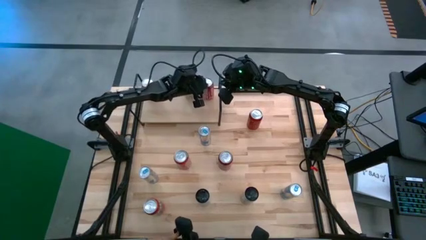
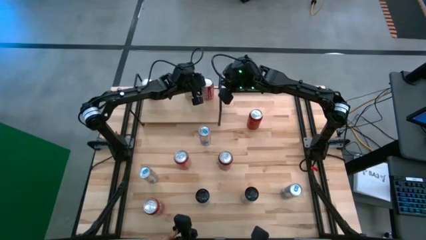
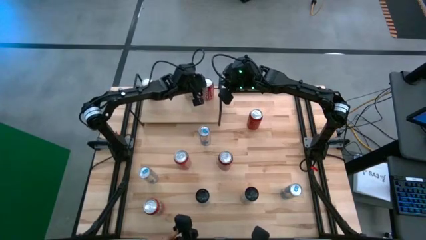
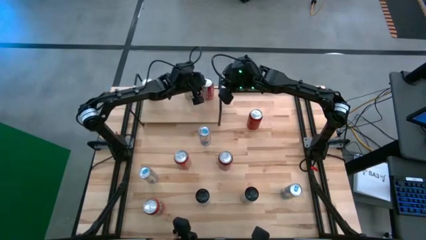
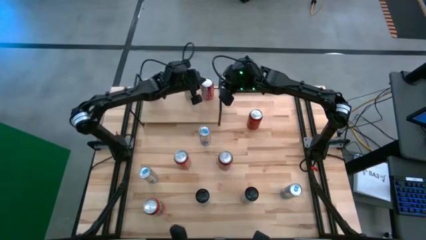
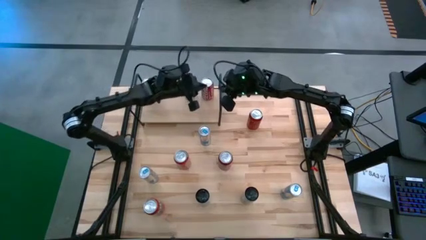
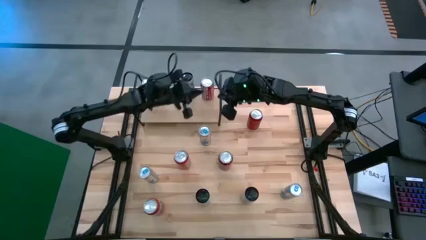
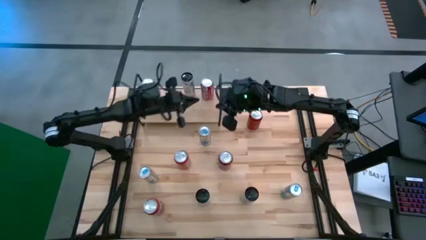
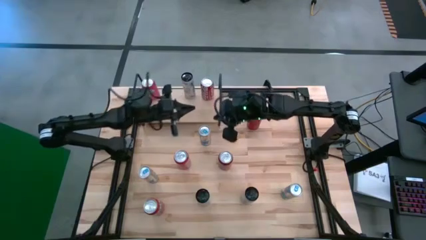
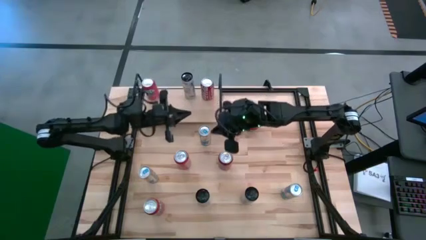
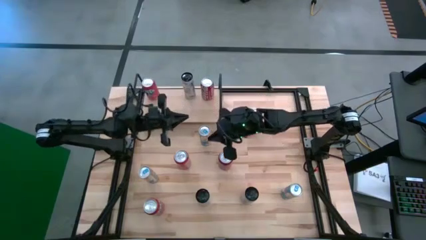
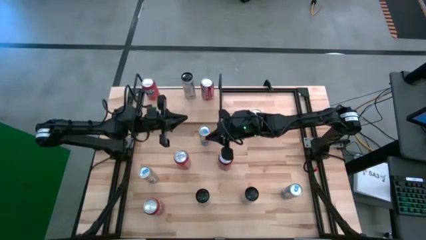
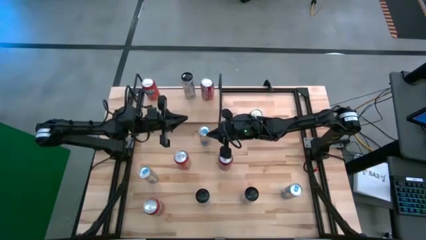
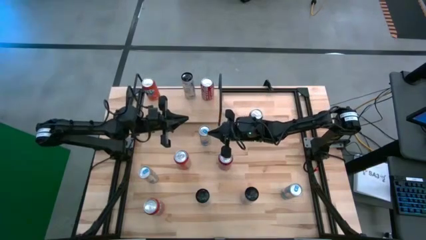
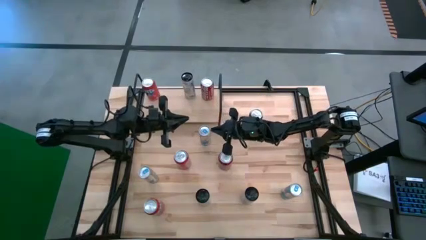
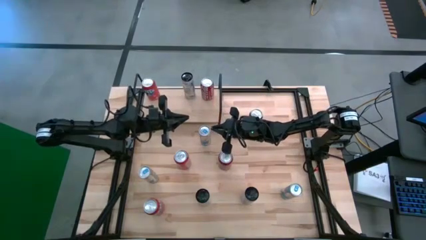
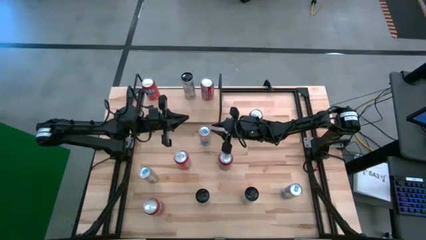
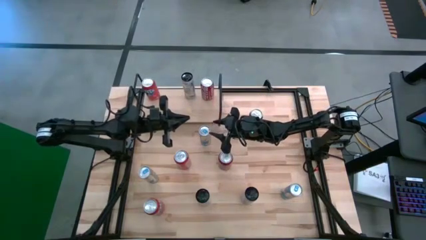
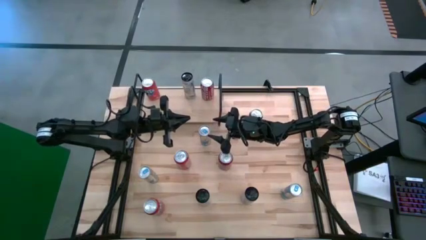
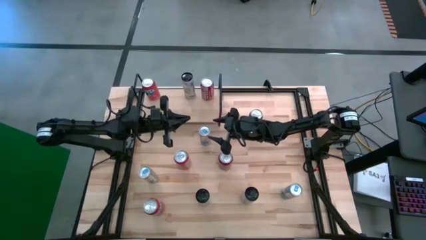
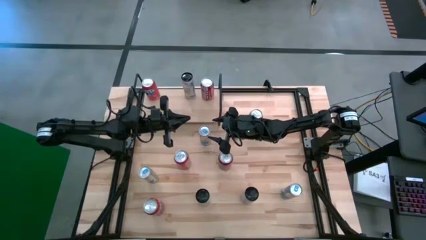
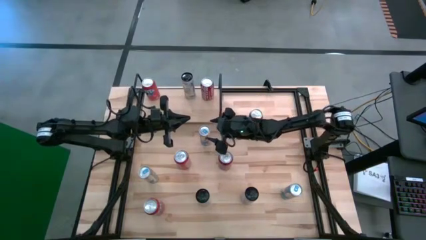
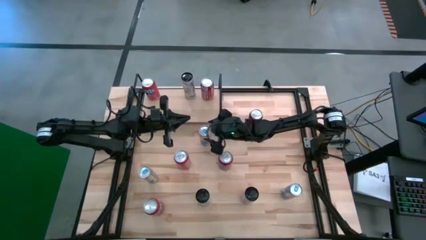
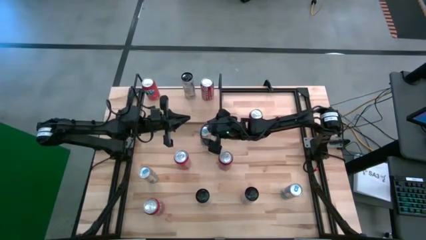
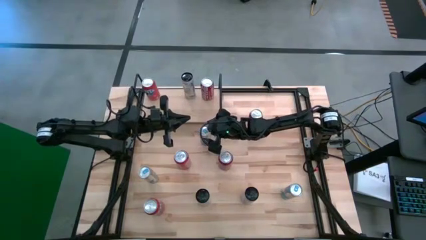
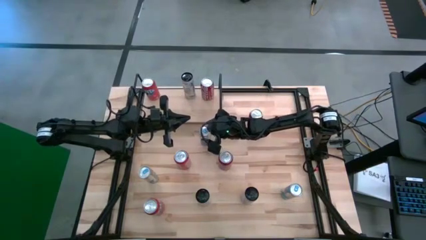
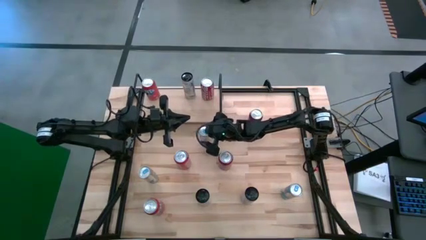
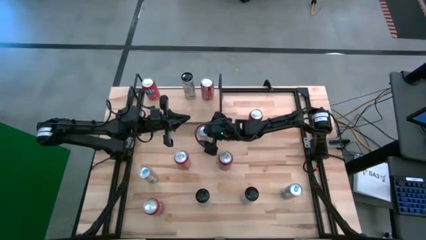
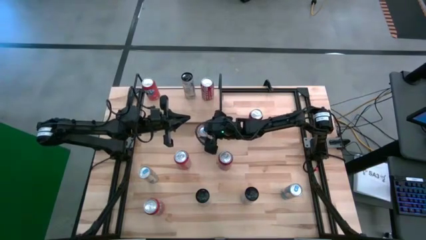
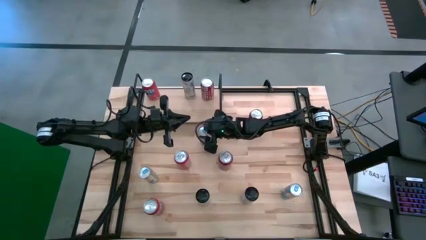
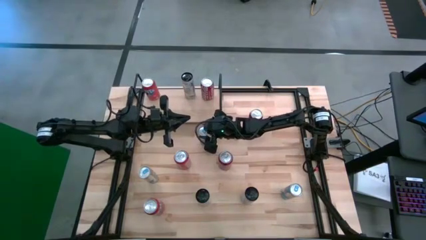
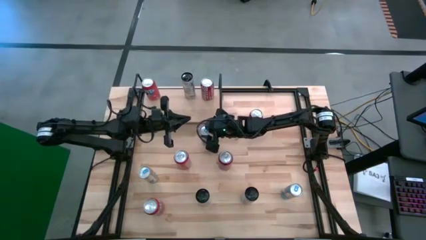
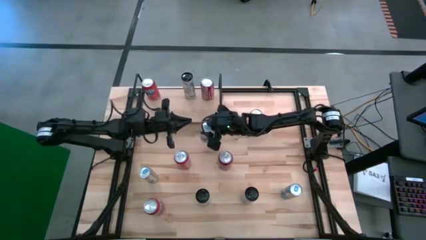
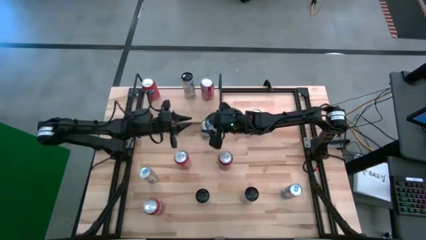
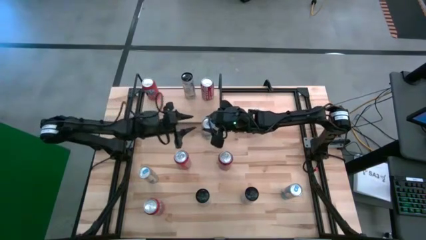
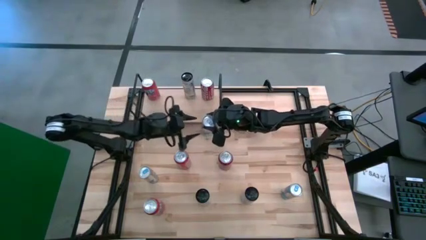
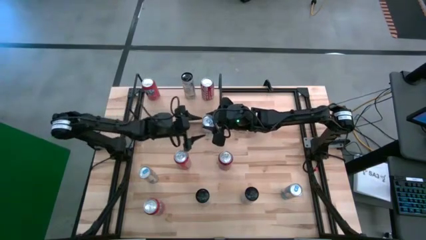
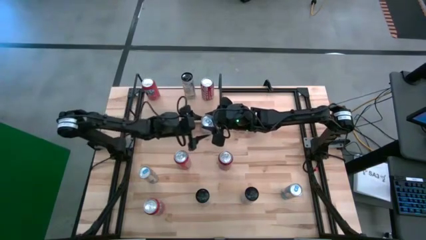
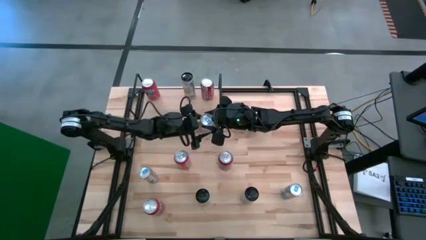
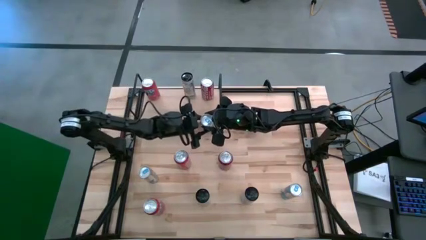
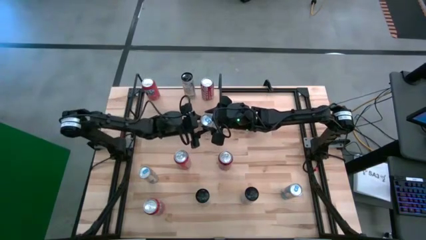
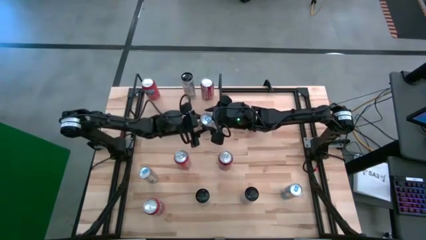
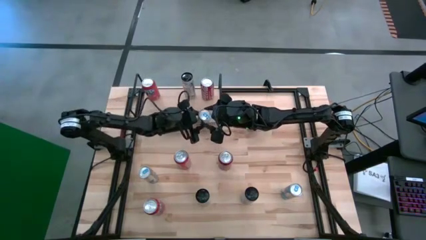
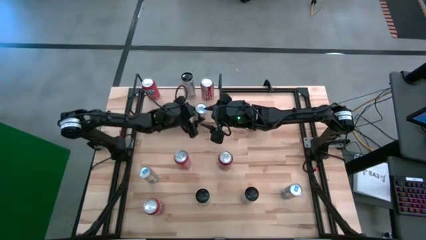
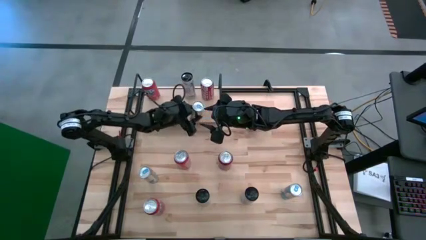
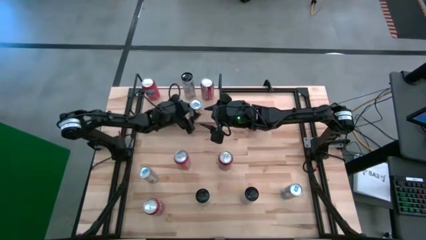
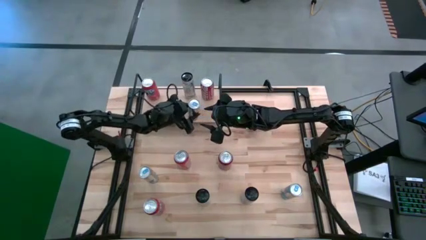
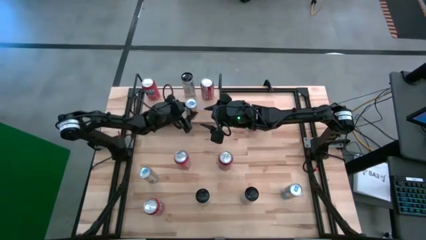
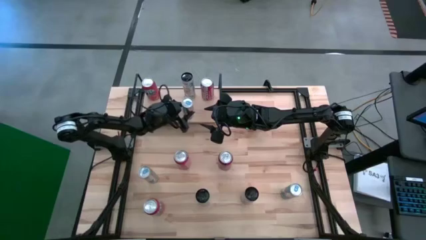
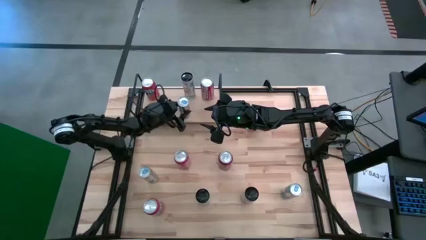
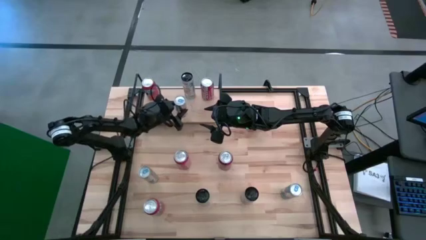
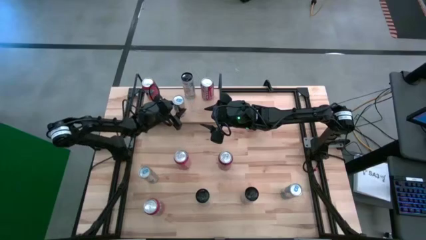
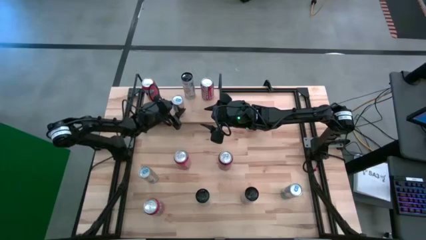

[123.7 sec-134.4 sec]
Task: Place canned beverage on shelf
Put the top blue soda can on the shelf

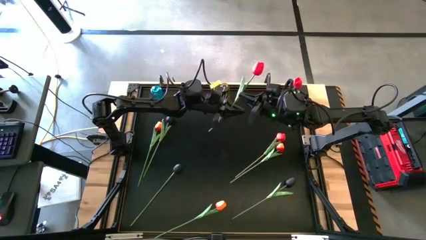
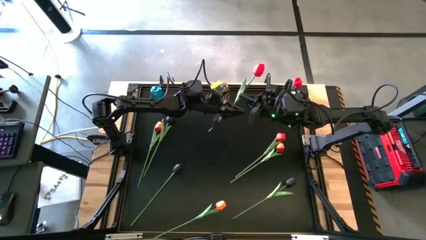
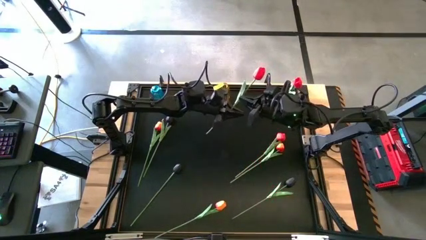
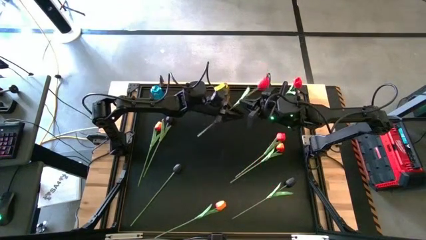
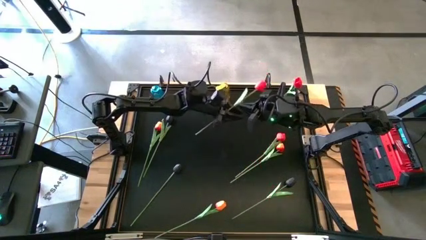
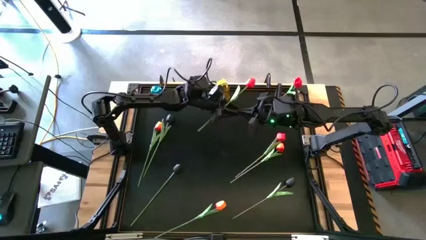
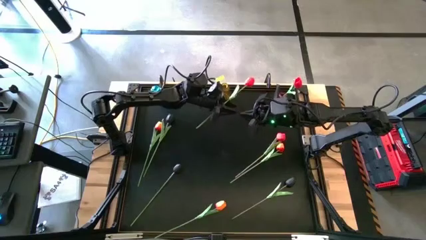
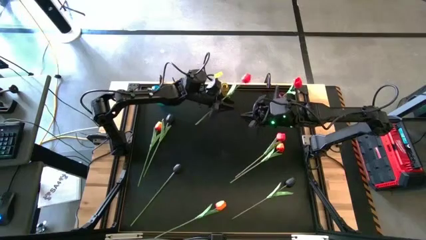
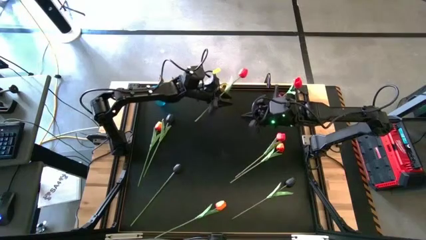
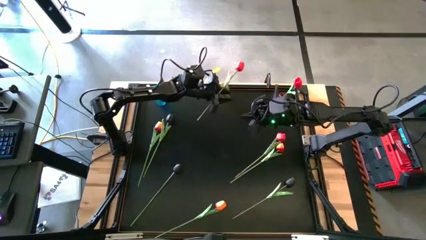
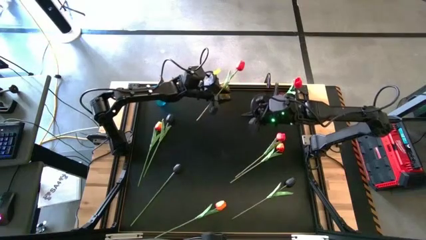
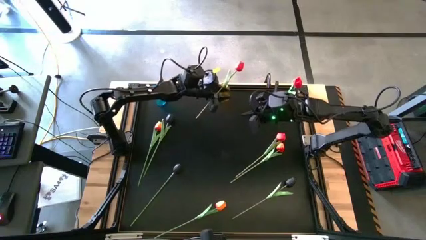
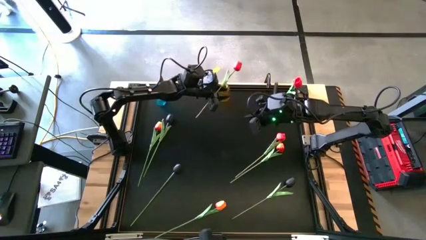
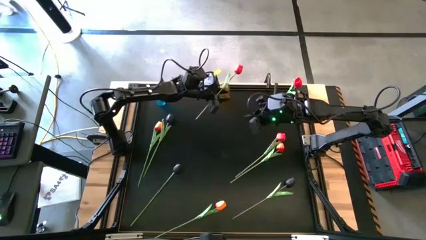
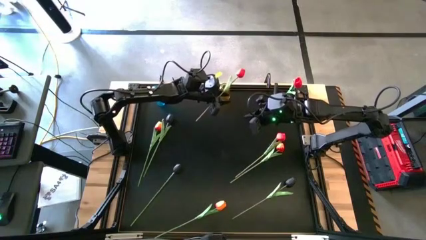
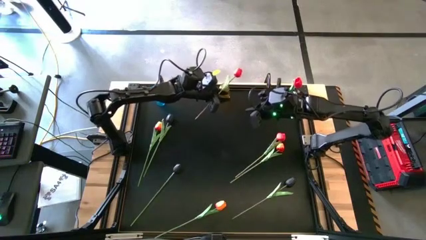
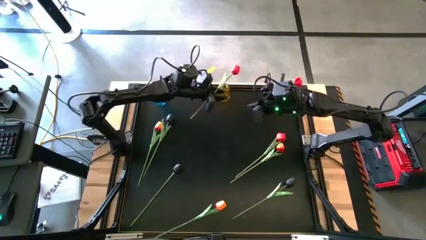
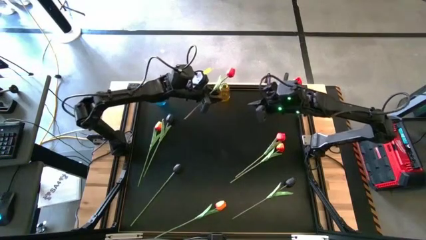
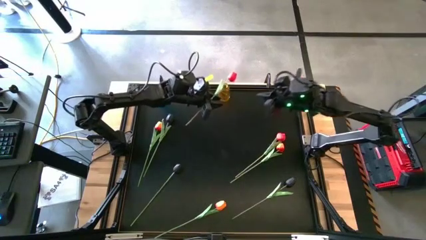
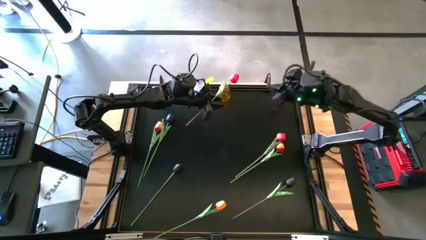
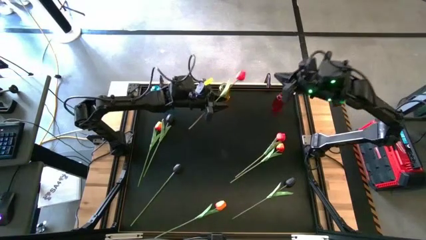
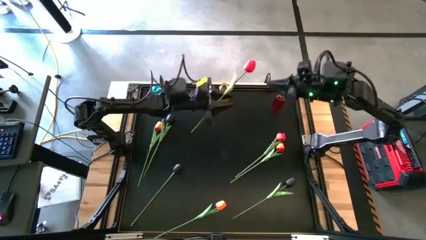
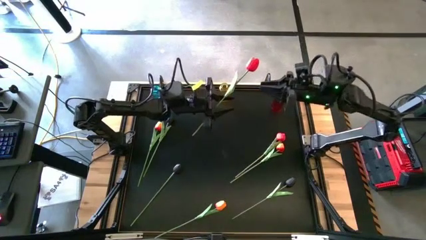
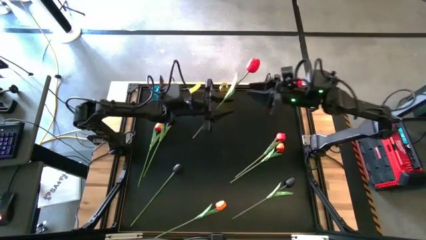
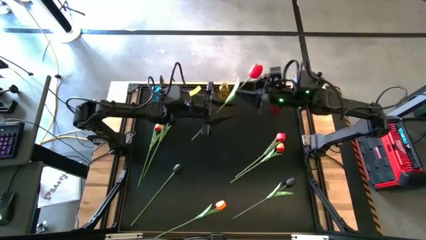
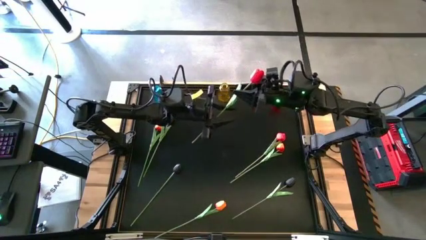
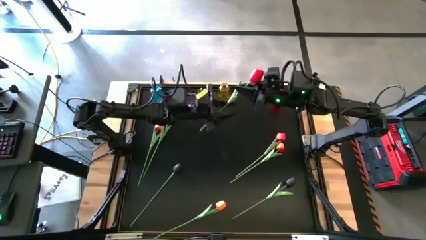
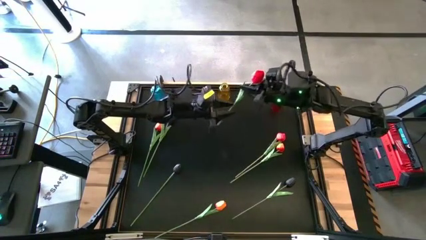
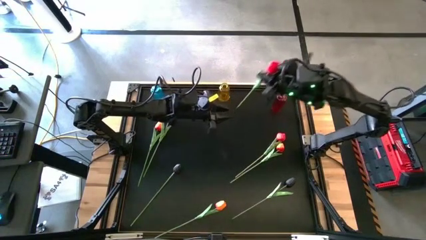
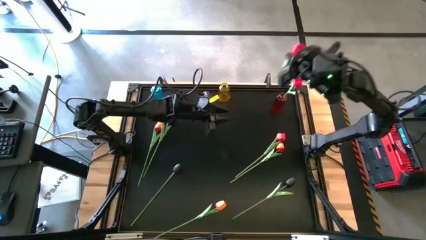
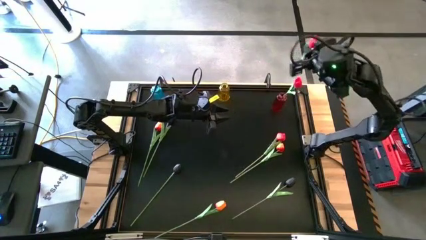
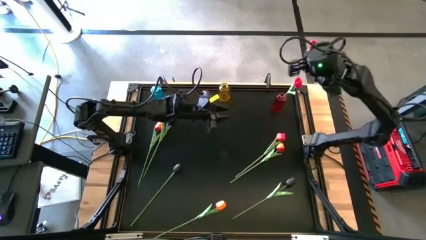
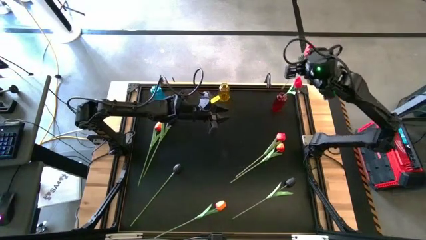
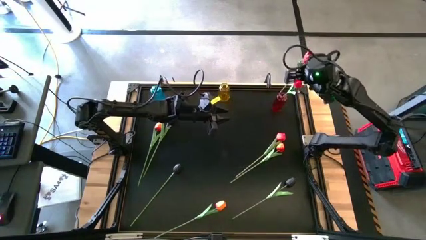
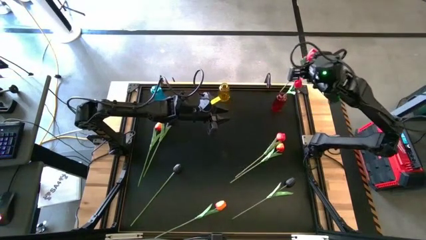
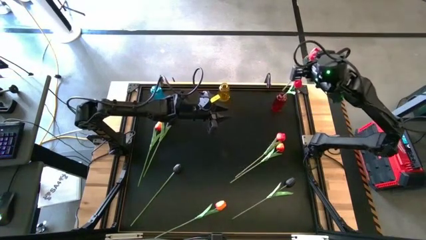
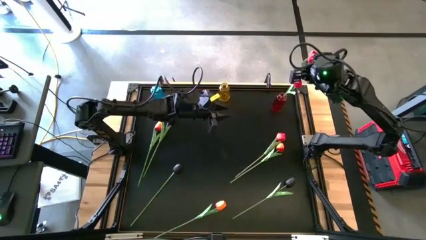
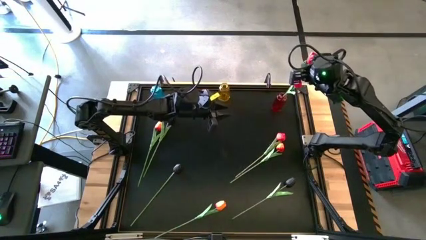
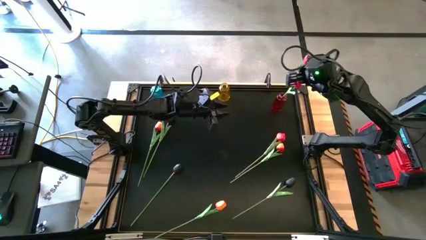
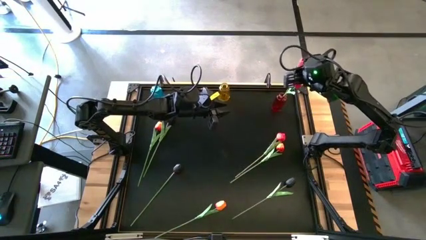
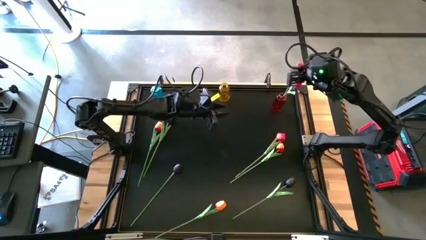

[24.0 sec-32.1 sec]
Task: Sort flowers into vase by color
Put the bottom red flower into the red vase
